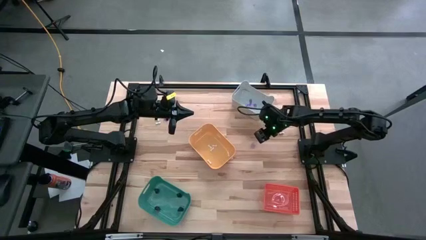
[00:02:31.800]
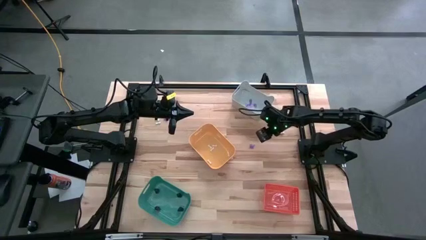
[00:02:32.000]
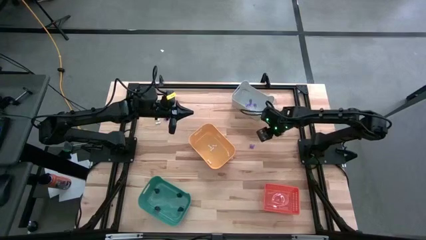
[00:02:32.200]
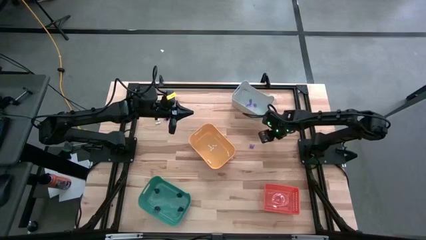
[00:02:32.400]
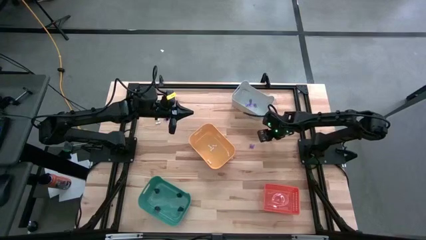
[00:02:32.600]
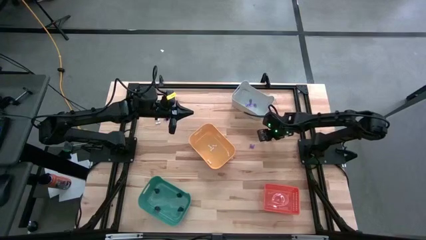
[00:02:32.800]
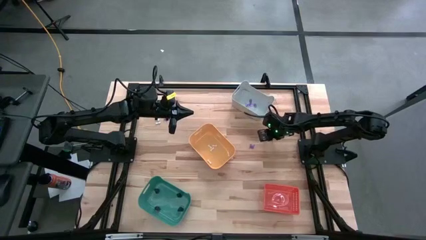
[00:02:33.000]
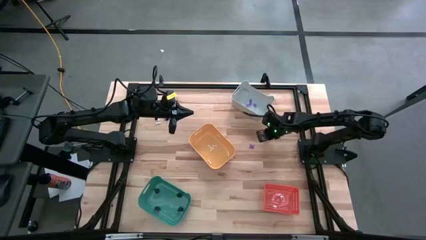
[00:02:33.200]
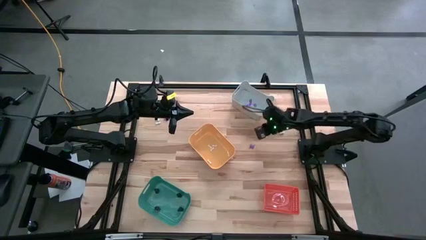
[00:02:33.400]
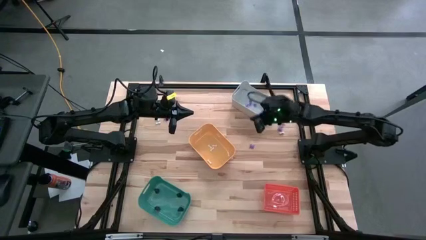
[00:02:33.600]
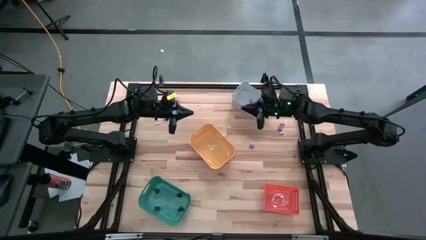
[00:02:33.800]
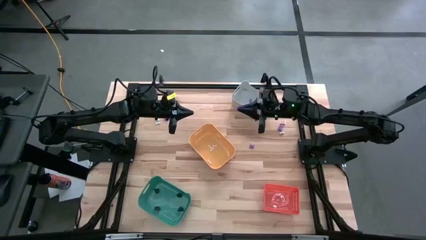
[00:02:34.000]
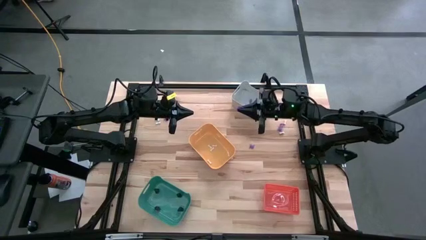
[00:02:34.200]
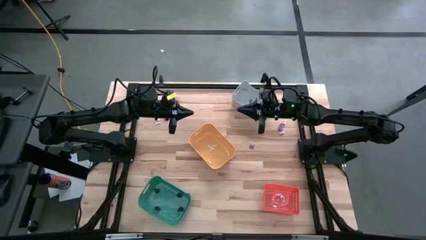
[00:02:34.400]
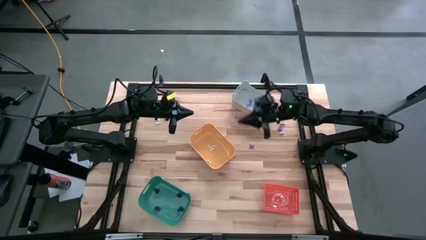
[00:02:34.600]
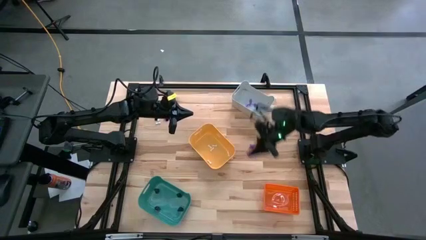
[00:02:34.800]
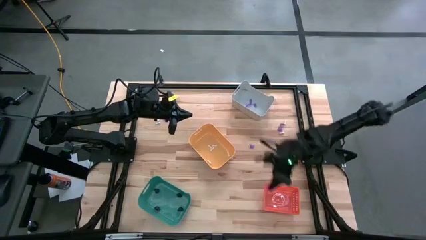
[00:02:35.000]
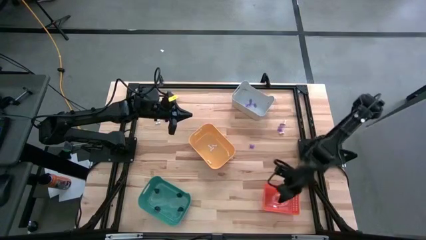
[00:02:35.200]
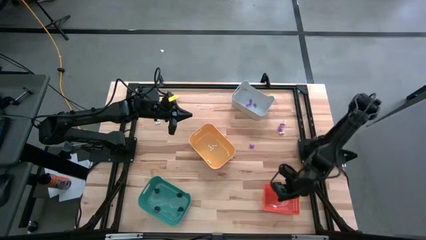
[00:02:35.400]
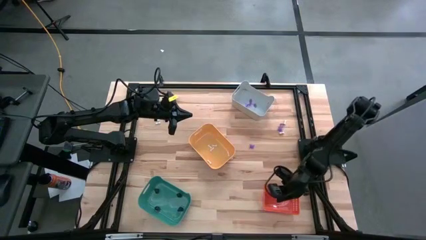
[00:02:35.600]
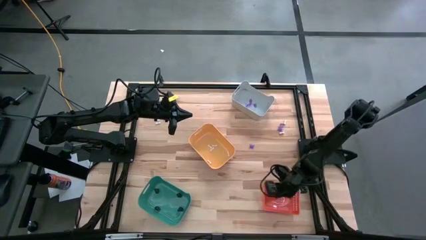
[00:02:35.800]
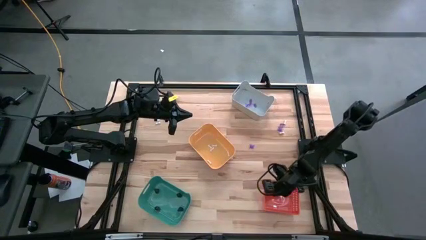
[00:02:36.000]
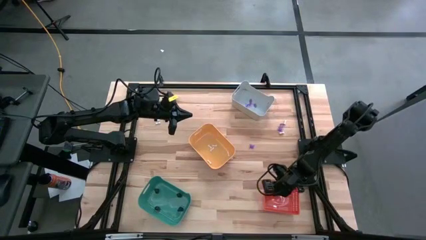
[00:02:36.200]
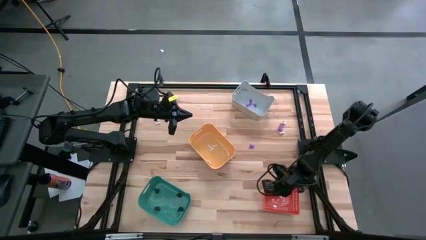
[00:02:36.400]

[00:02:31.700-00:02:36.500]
Task: Sort Halloween decoration
Put the purple spider toy into the orange bin

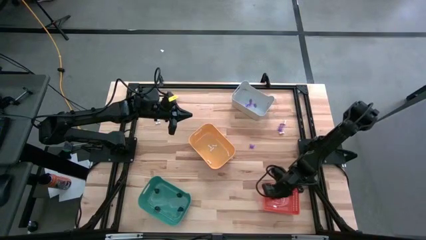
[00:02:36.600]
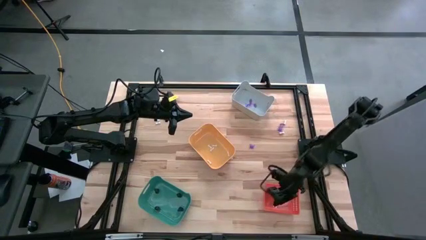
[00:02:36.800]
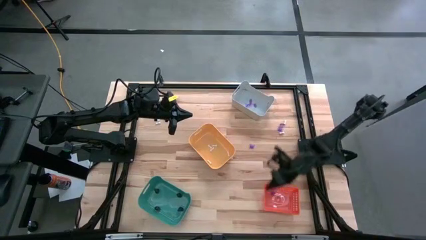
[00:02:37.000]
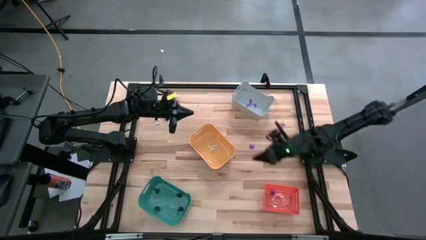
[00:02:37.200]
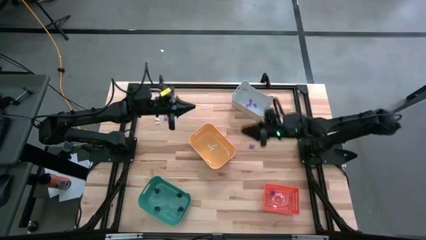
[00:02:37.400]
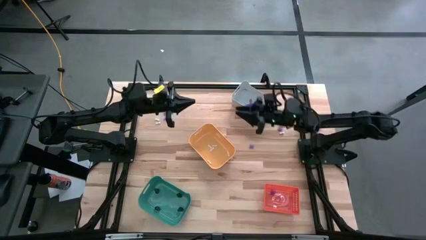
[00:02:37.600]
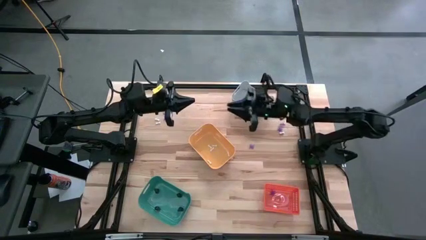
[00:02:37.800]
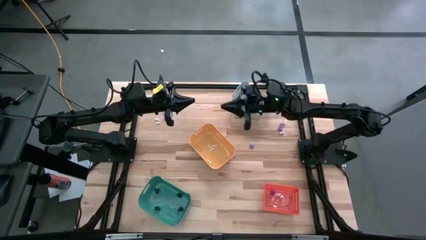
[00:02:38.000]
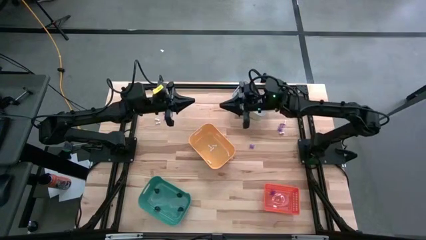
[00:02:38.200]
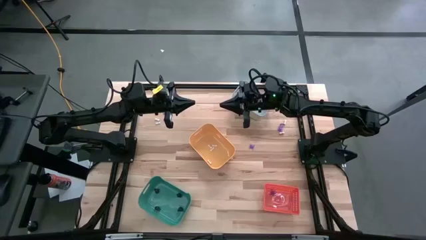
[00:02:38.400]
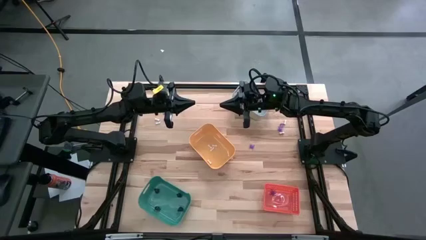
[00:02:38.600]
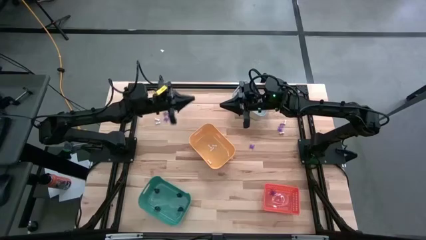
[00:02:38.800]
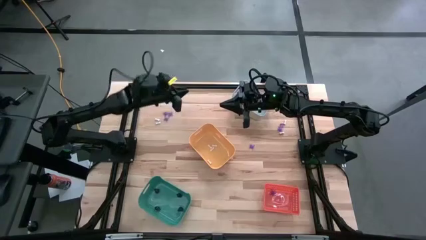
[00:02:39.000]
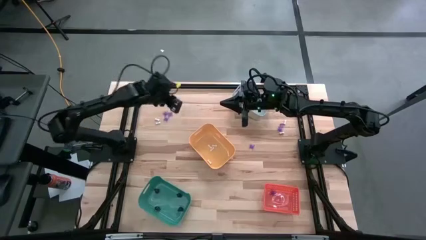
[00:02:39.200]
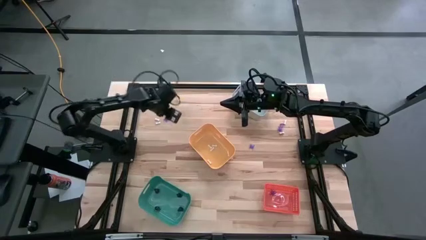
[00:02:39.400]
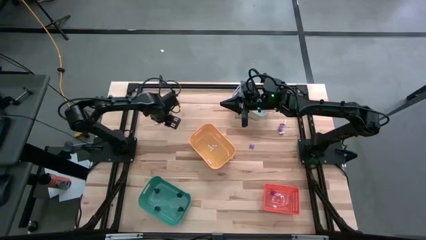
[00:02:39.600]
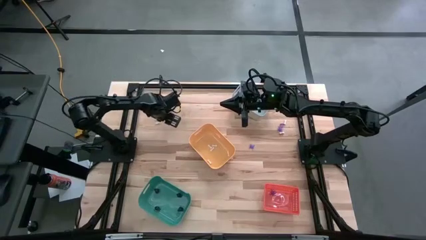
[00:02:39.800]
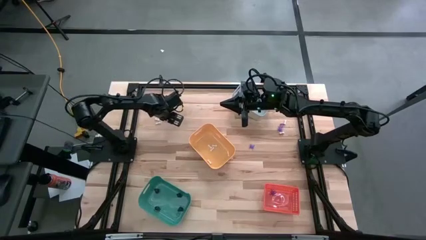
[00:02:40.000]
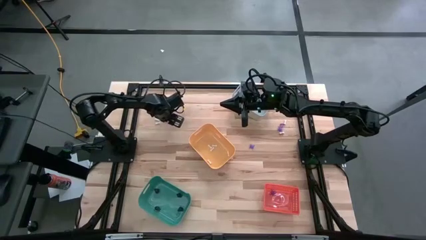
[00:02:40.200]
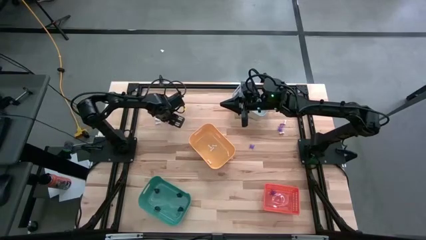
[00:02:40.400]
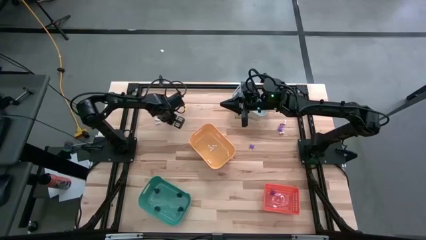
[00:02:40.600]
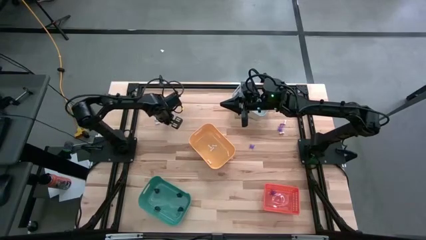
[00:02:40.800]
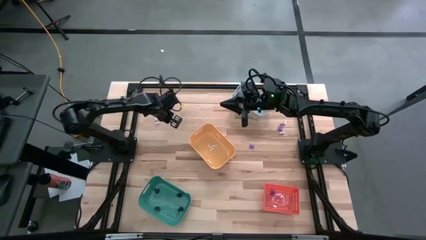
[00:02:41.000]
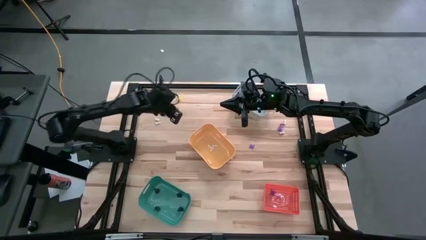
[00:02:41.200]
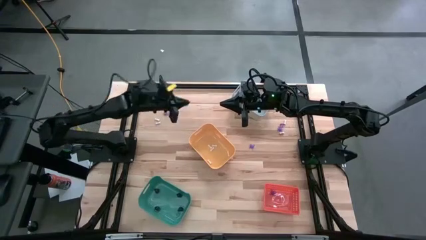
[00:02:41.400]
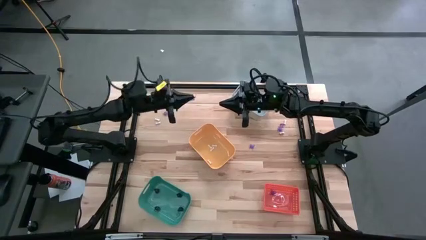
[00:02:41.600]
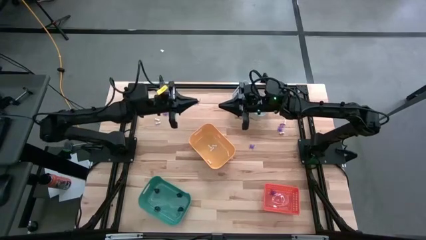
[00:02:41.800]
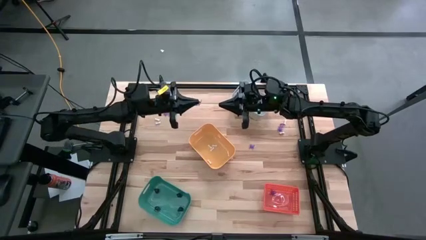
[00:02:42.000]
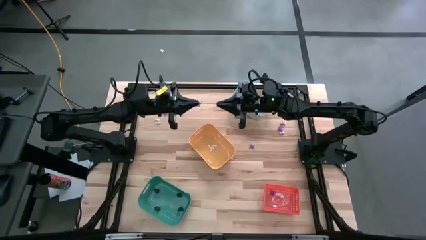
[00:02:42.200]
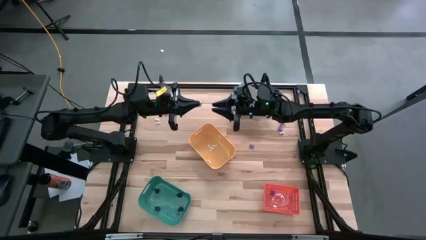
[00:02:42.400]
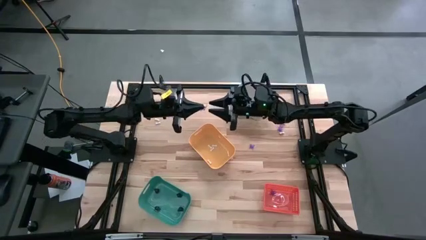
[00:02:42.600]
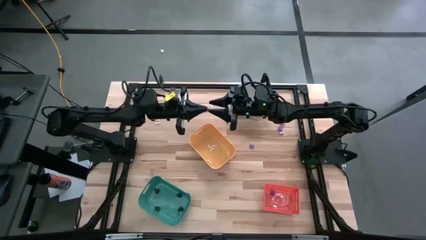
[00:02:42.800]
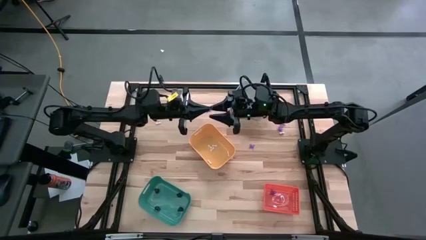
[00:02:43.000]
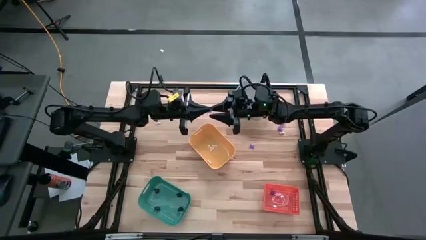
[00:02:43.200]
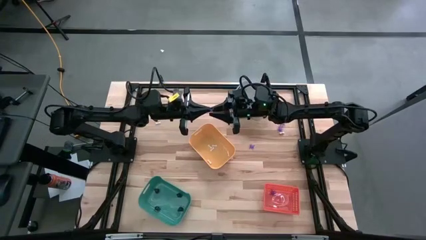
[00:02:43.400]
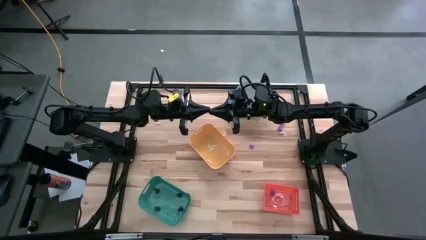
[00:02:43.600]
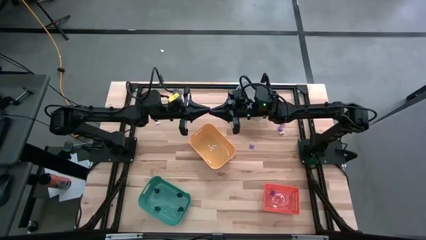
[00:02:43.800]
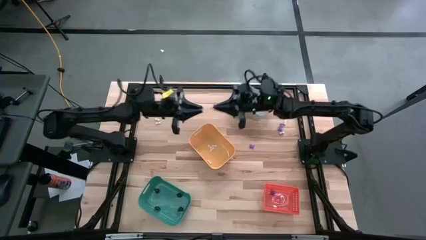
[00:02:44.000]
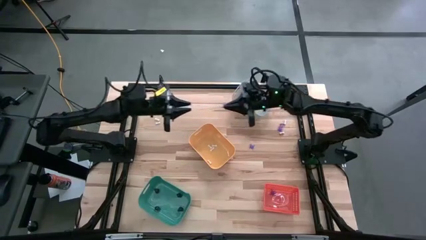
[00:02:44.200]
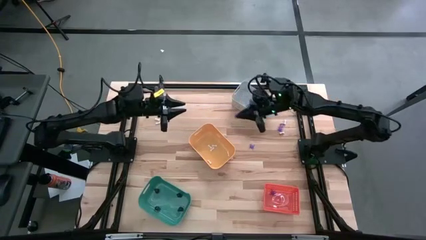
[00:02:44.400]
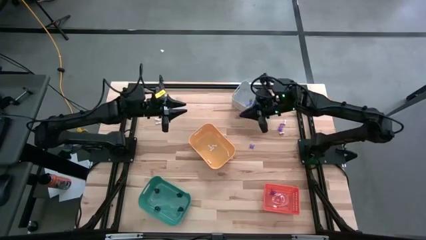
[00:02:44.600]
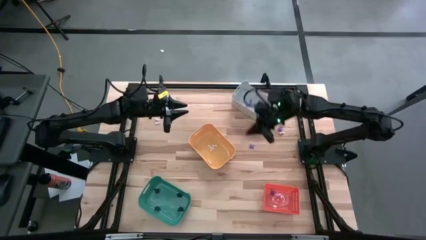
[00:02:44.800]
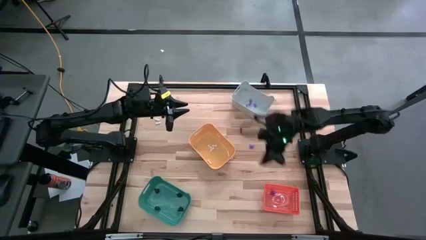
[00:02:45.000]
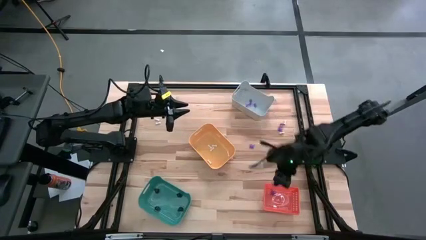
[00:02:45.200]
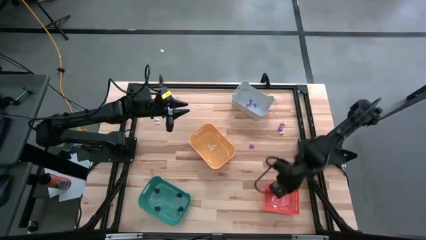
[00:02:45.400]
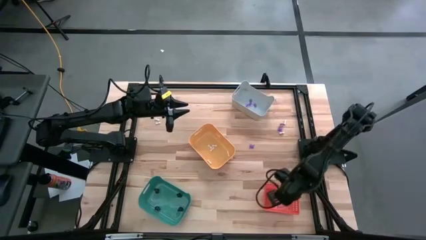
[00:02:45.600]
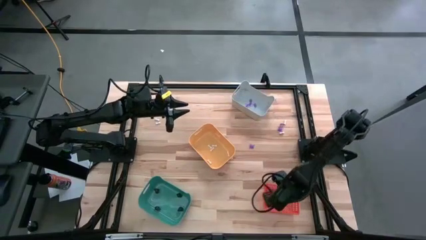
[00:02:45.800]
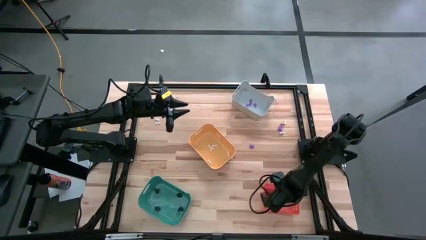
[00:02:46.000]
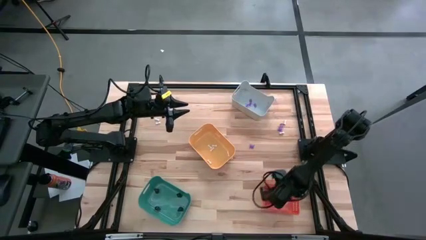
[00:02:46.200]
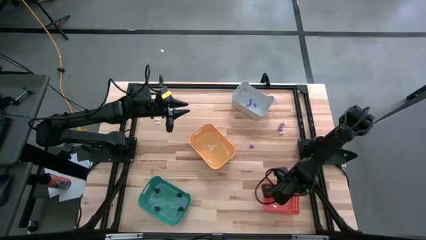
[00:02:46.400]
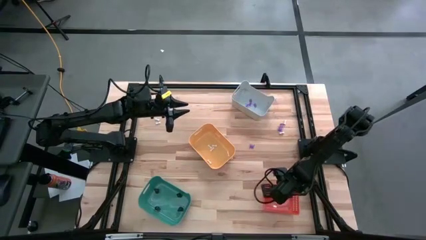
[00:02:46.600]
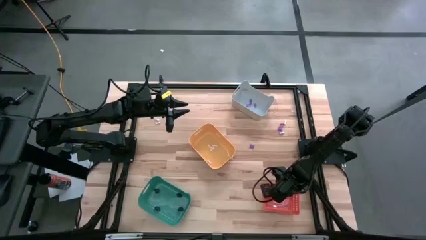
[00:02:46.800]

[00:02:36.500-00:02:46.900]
Put the purple spider toy into the orange bin
